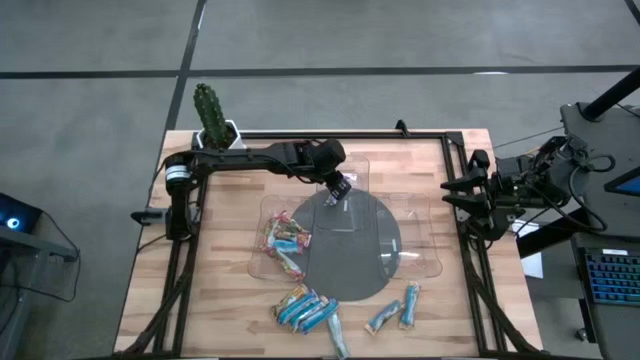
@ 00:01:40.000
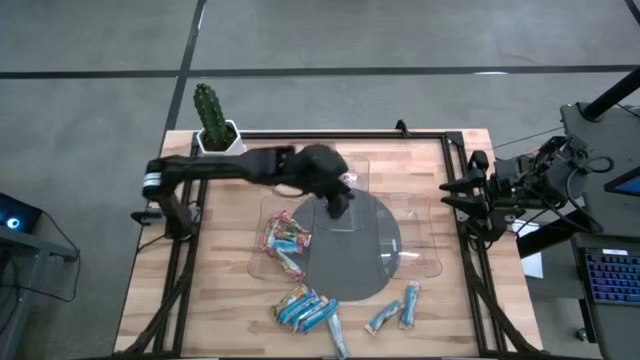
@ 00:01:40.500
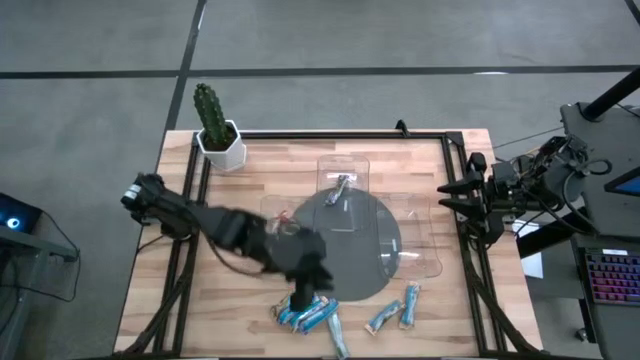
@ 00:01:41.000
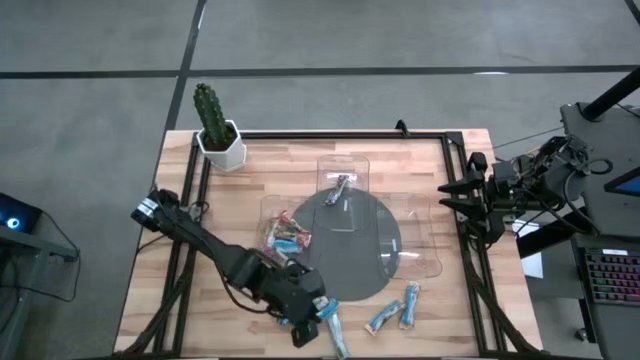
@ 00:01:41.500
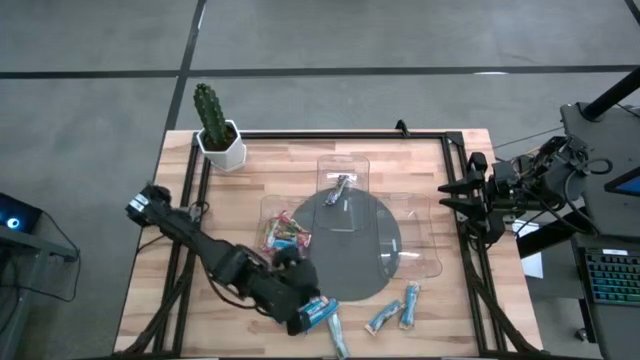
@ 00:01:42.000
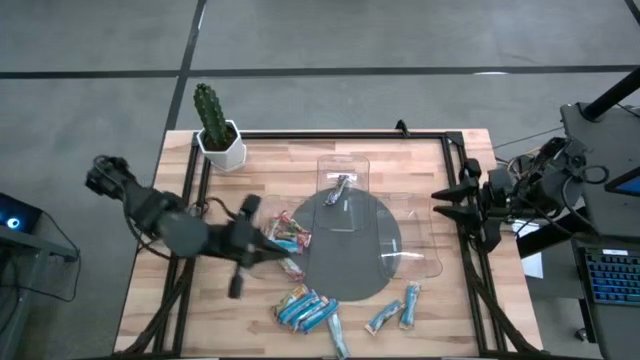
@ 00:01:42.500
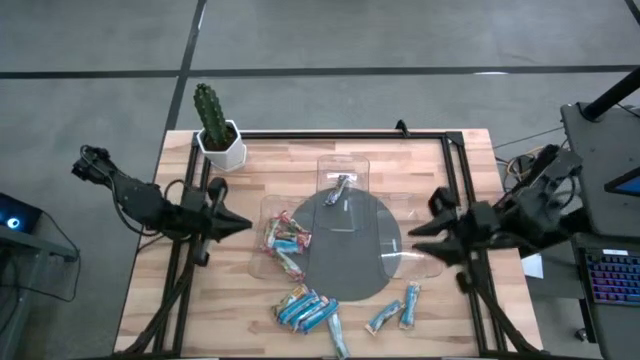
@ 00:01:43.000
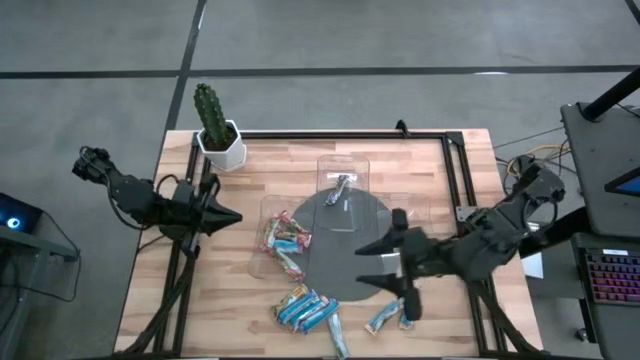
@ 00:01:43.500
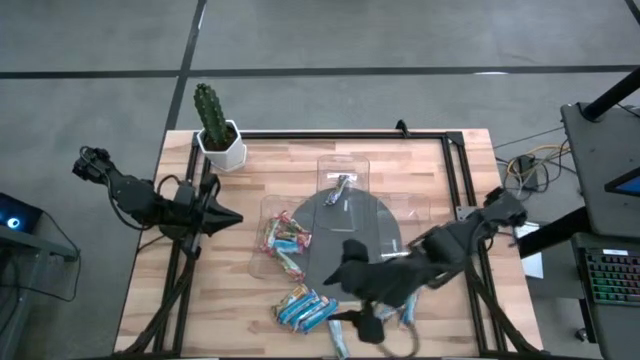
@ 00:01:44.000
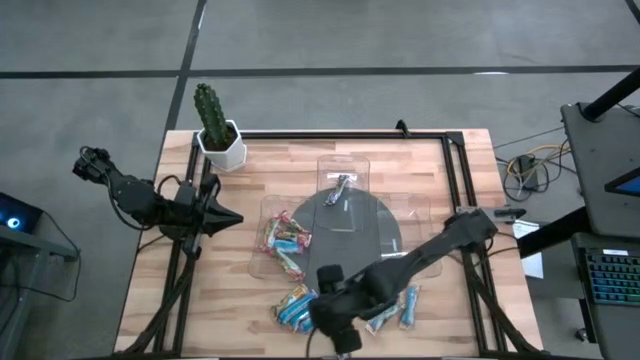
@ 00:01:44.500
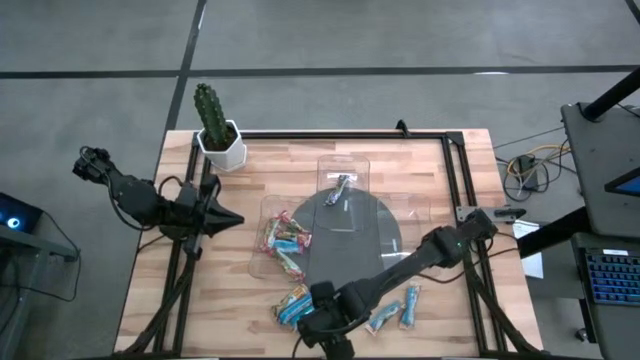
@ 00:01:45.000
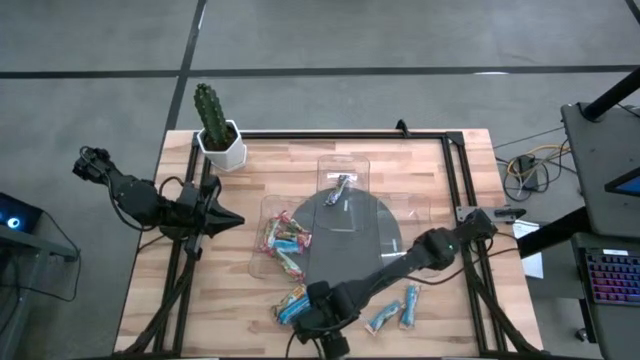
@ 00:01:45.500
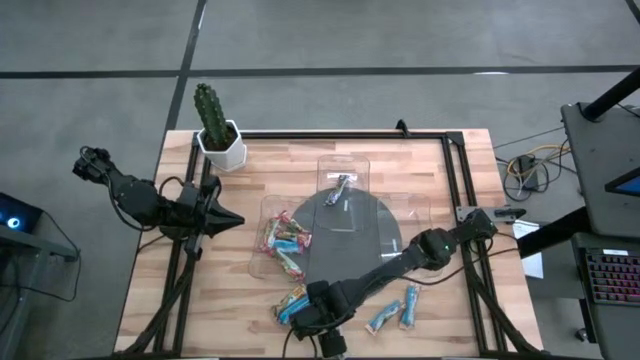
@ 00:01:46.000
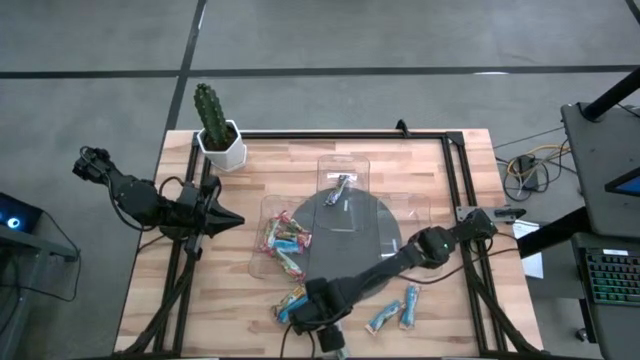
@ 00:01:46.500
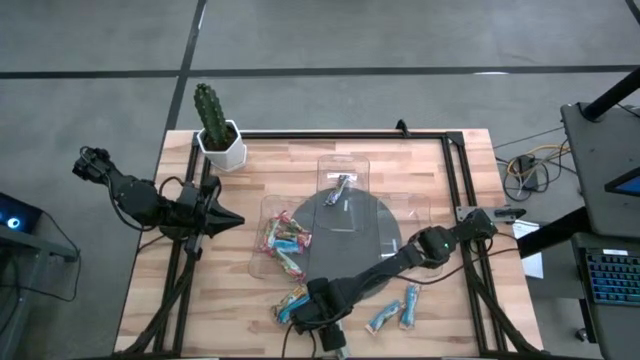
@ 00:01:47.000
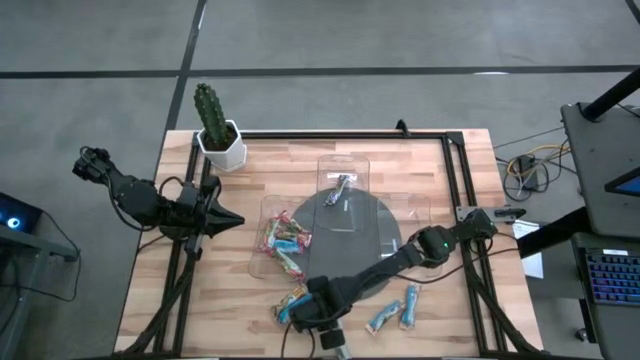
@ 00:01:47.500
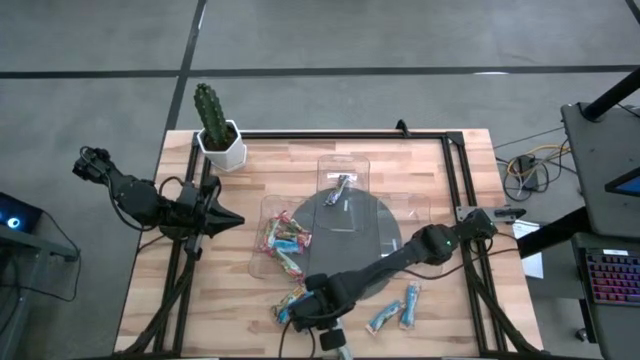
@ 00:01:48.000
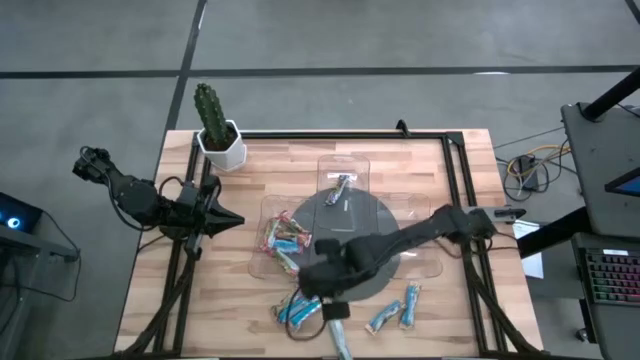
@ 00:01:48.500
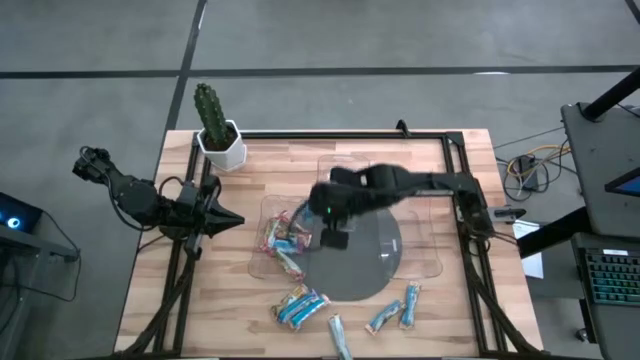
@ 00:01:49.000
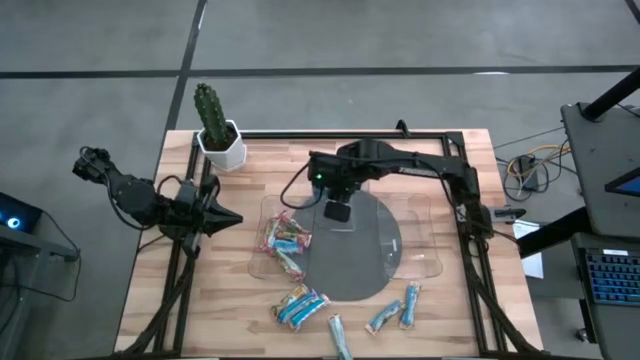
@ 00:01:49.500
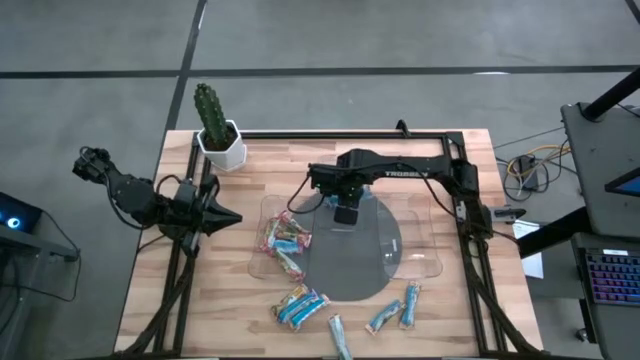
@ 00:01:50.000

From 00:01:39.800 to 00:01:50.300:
Task: Pick and place Granola Bars by type
Put the blue granola bar into the top transparent bin

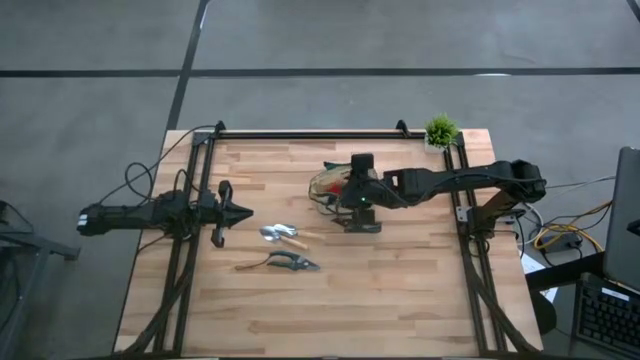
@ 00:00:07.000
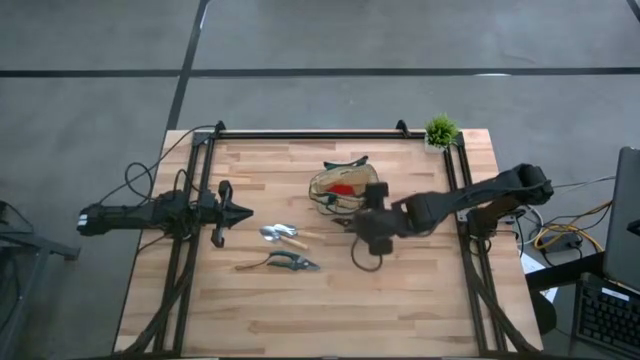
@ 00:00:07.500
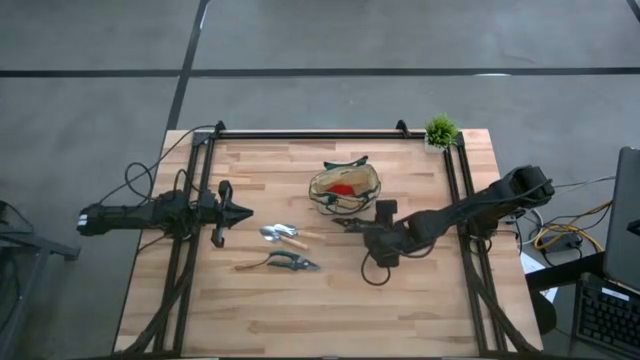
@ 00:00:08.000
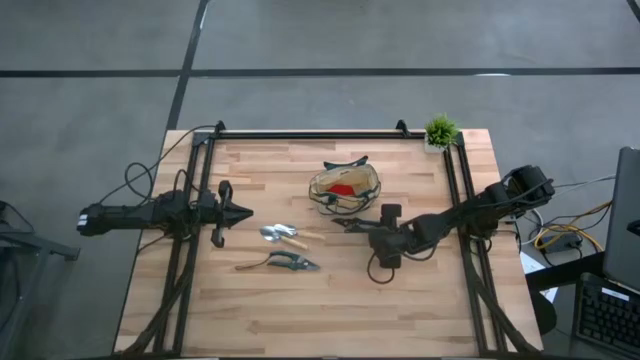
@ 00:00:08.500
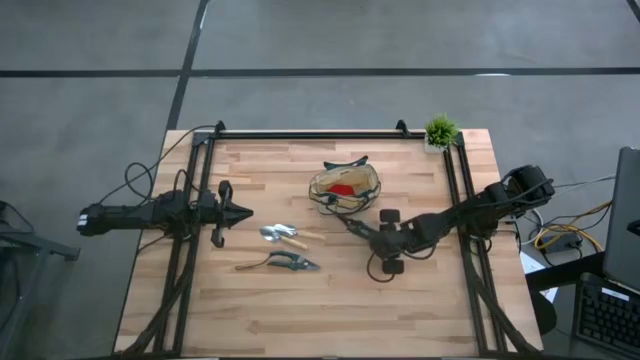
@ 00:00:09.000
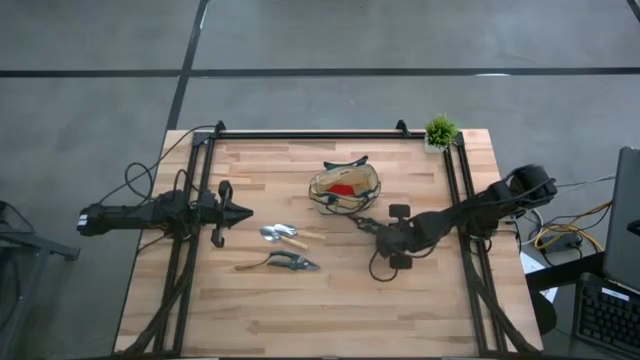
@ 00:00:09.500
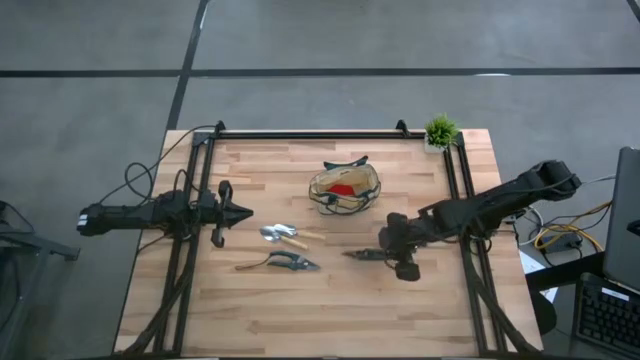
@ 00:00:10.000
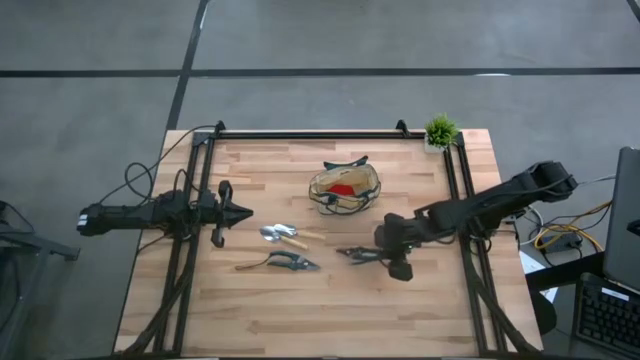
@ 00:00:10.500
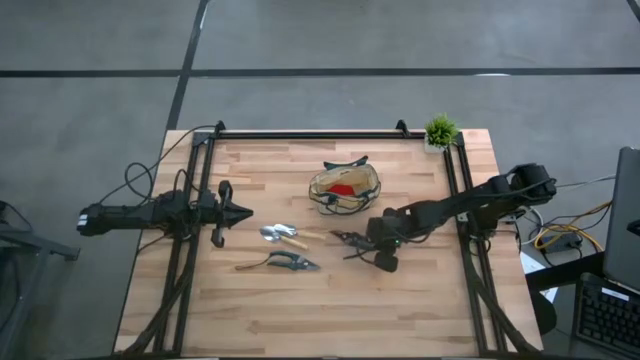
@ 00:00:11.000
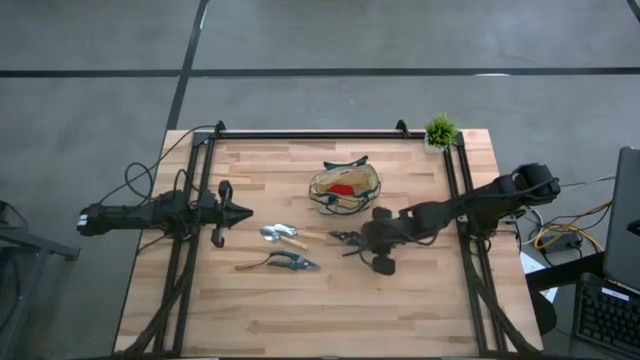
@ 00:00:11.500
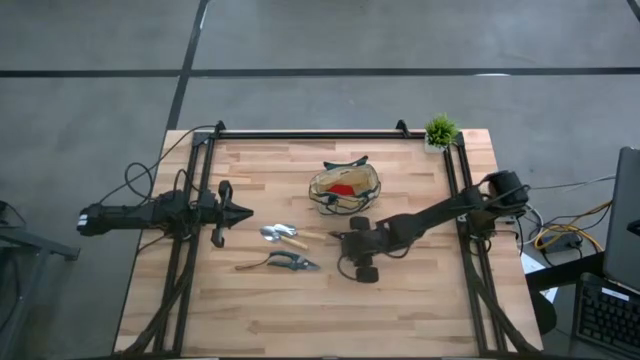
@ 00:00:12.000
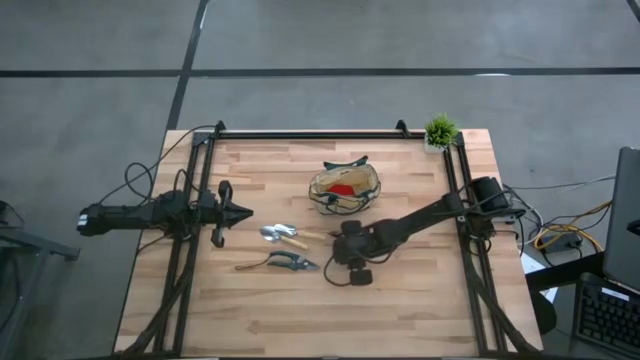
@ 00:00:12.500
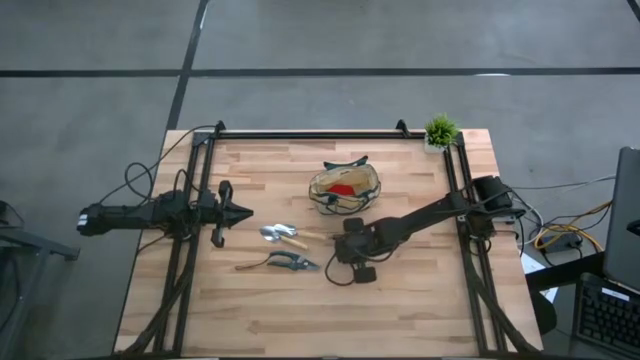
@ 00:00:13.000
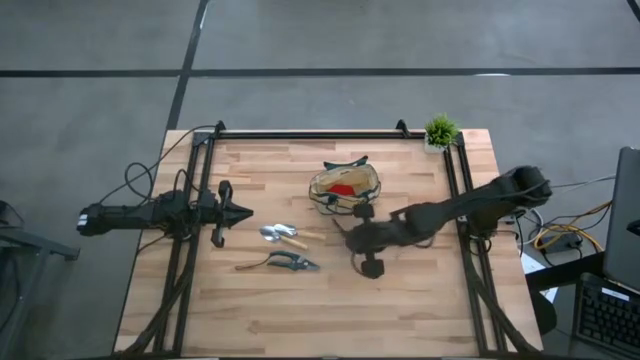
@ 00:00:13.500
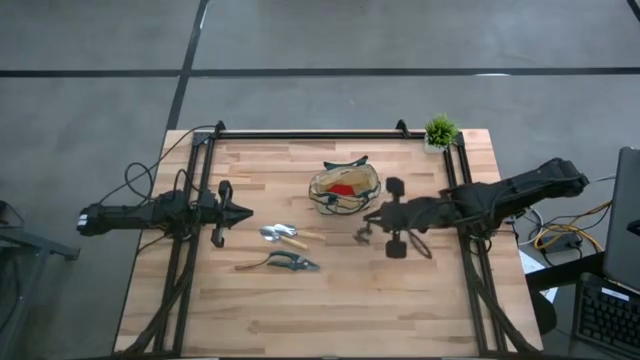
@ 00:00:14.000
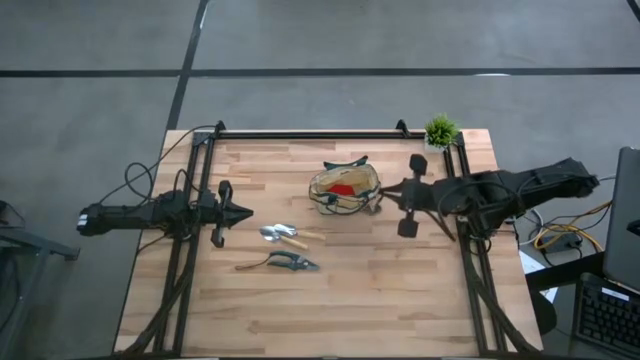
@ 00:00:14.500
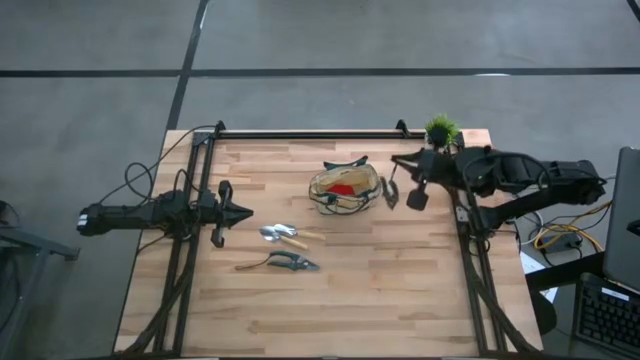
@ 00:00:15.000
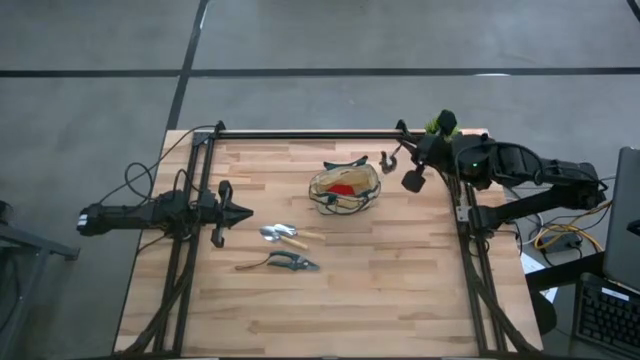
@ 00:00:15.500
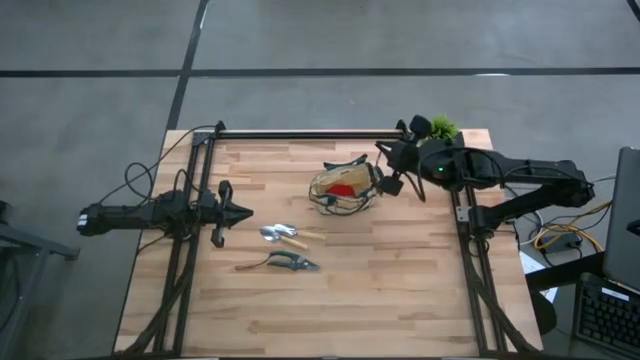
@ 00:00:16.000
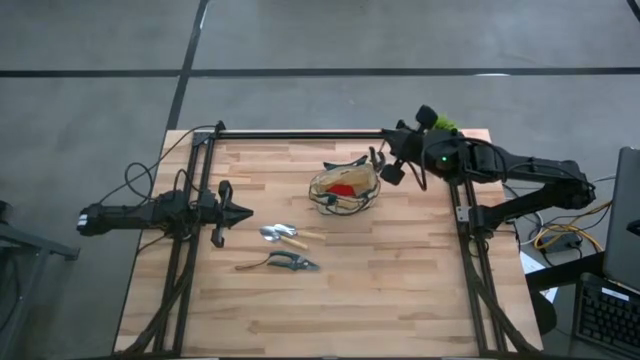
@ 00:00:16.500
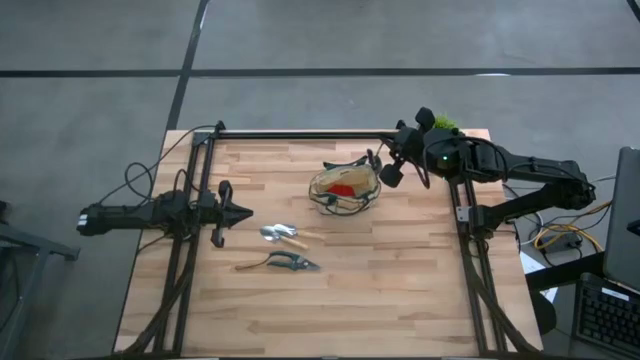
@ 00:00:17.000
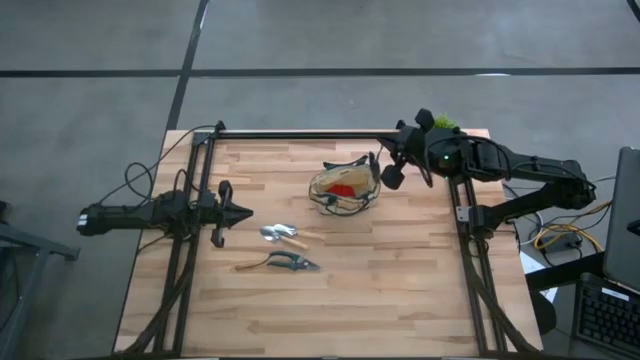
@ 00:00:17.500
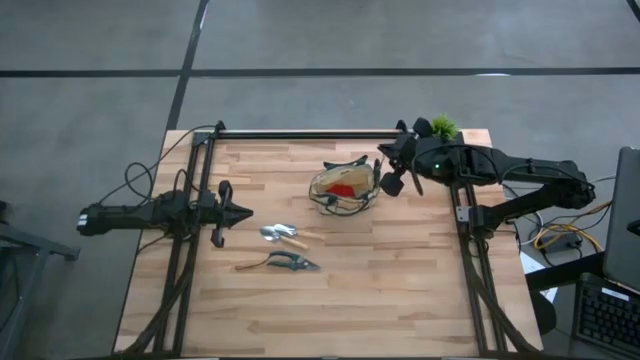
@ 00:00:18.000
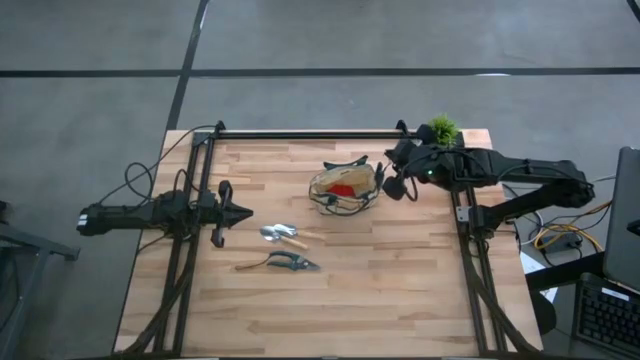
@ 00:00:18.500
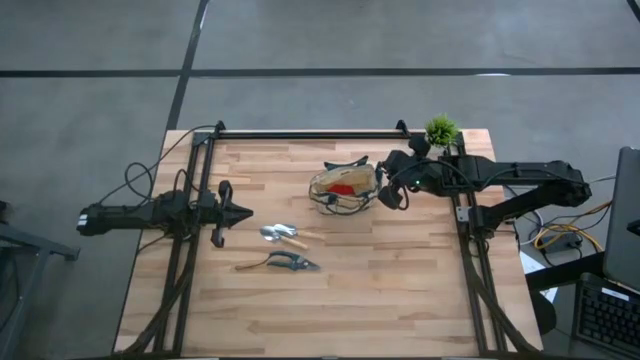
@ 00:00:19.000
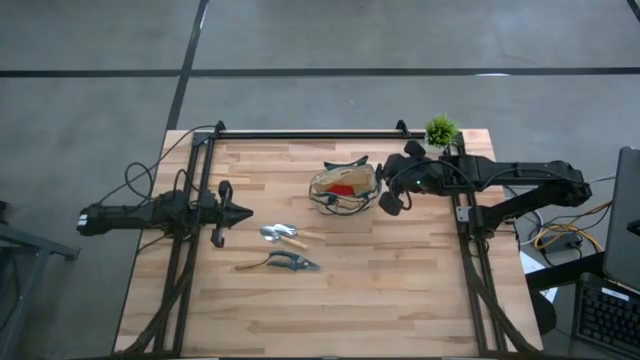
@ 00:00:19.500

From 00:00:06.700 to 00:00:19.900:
Task: Pick & Place Garden tools in Gardening bag
Put the green scissors into the brown bag
